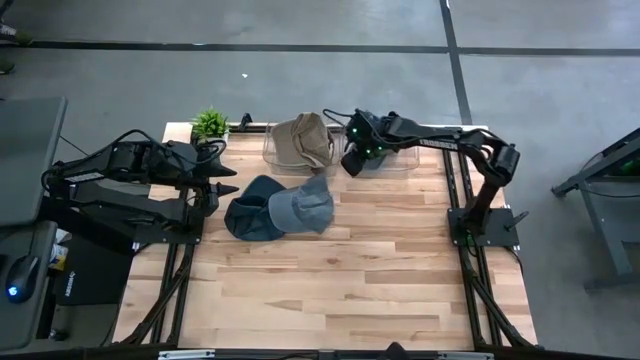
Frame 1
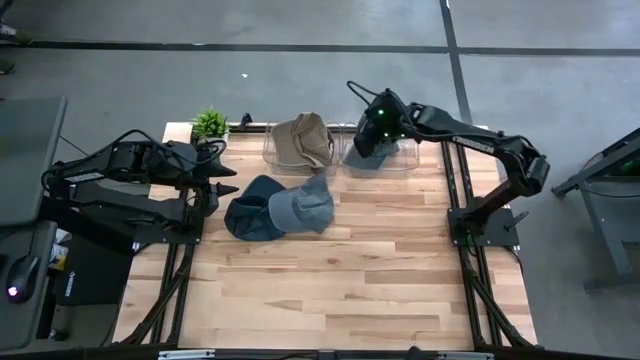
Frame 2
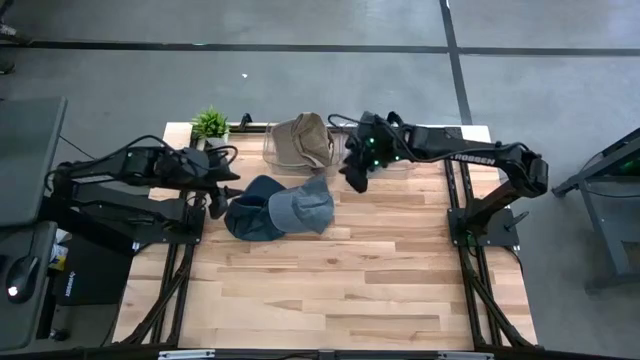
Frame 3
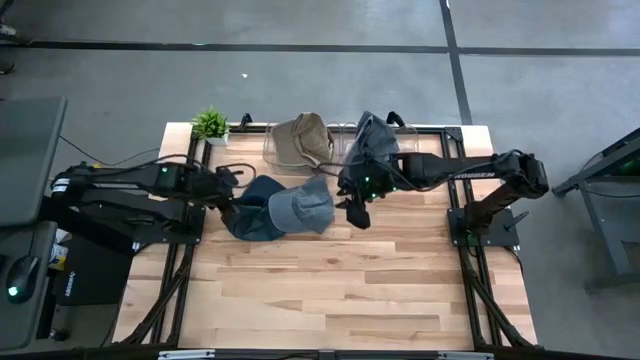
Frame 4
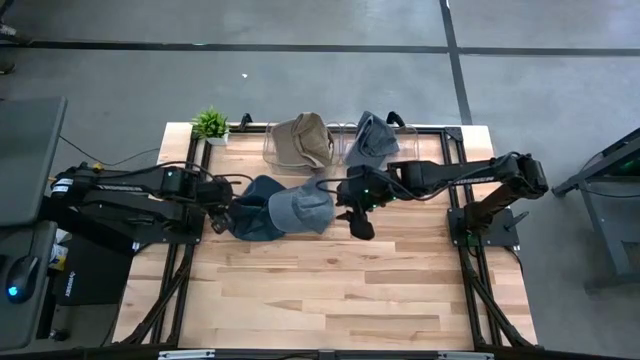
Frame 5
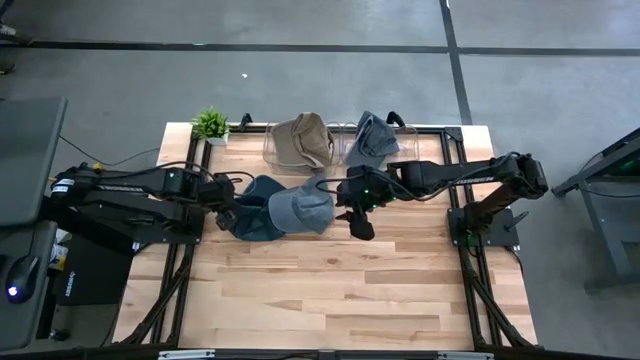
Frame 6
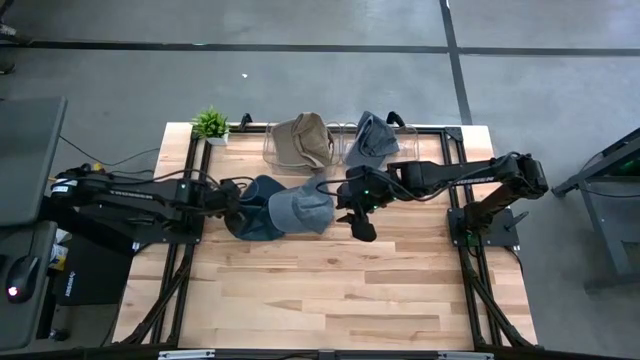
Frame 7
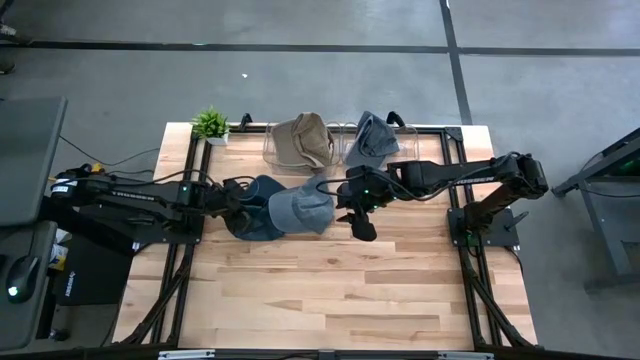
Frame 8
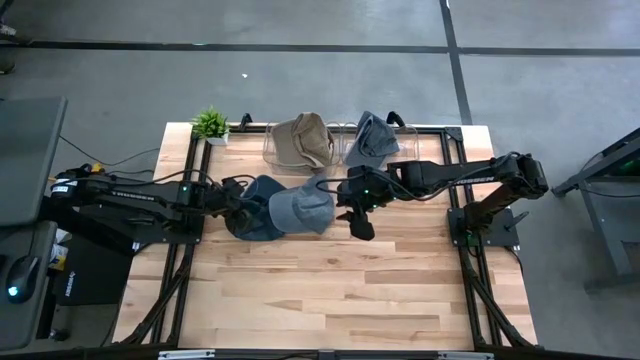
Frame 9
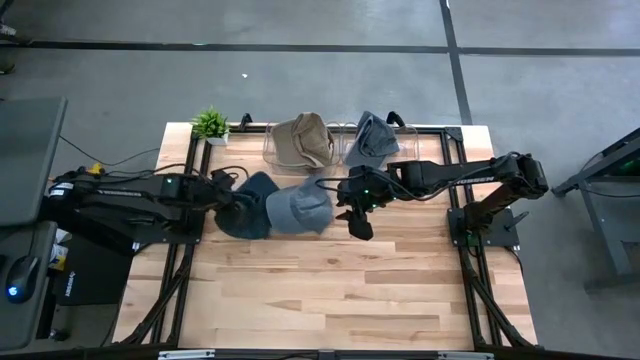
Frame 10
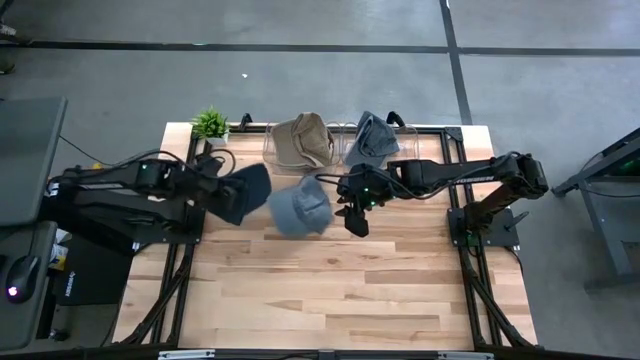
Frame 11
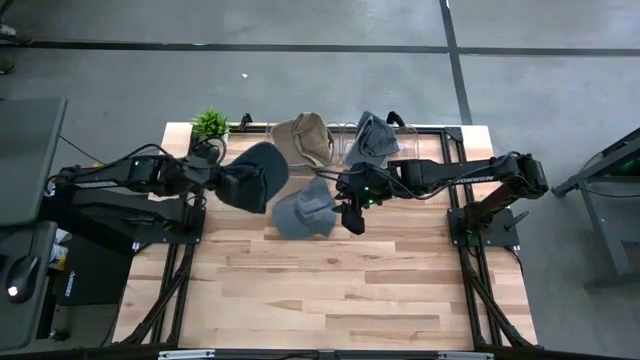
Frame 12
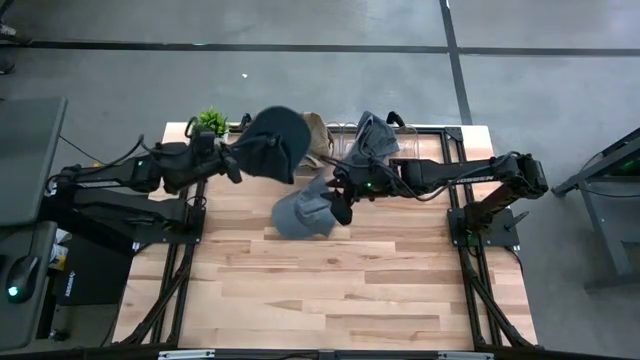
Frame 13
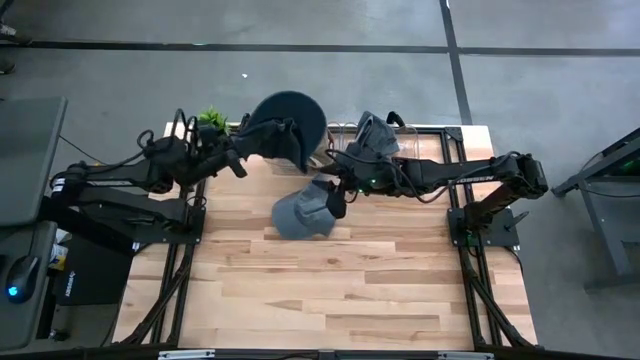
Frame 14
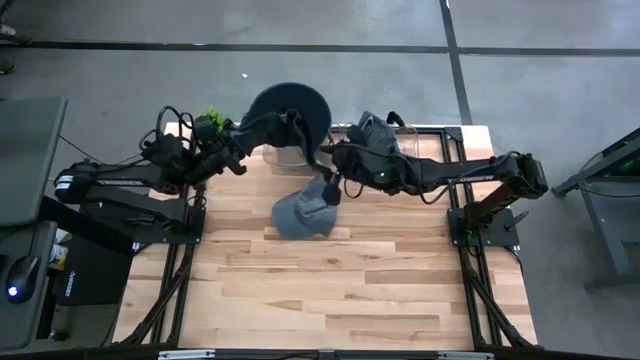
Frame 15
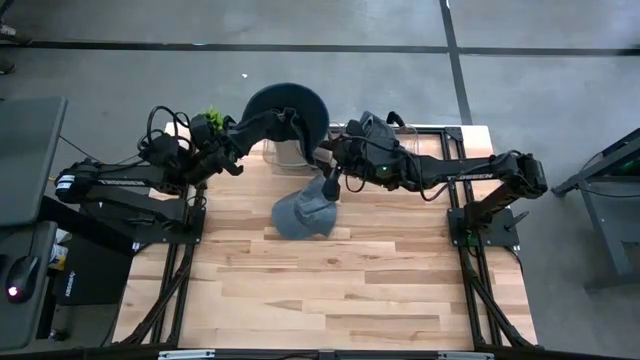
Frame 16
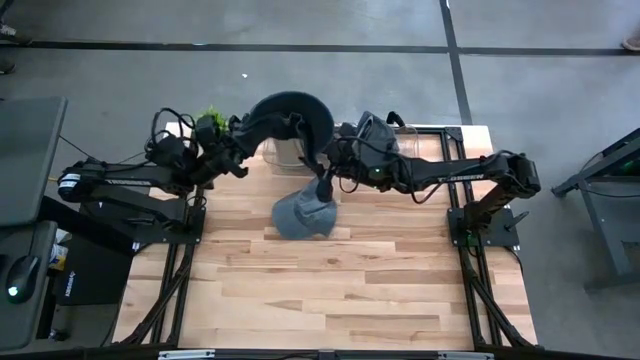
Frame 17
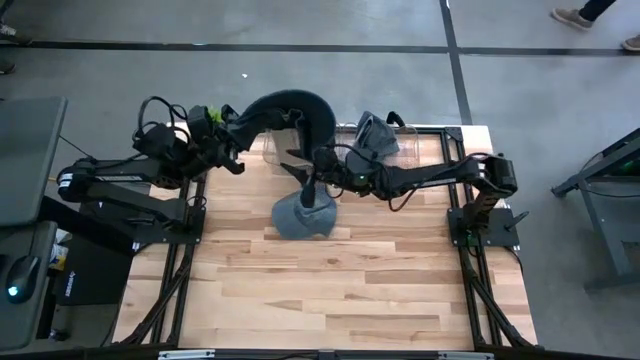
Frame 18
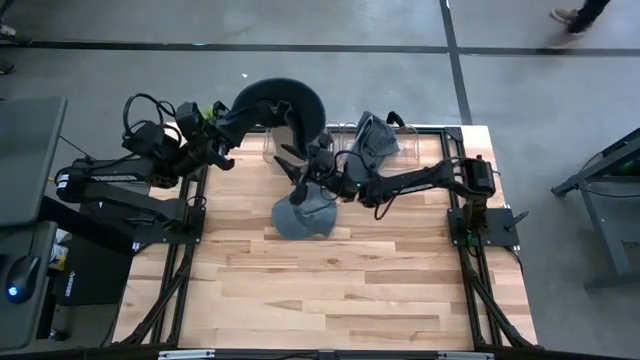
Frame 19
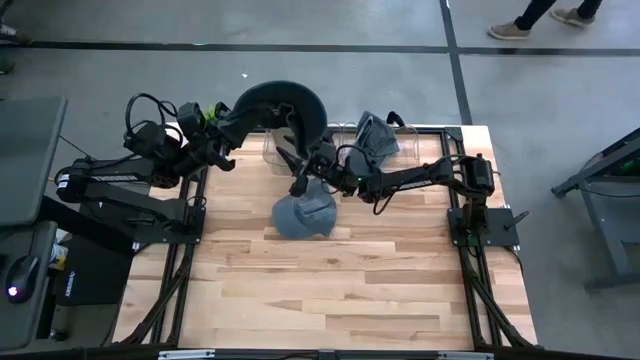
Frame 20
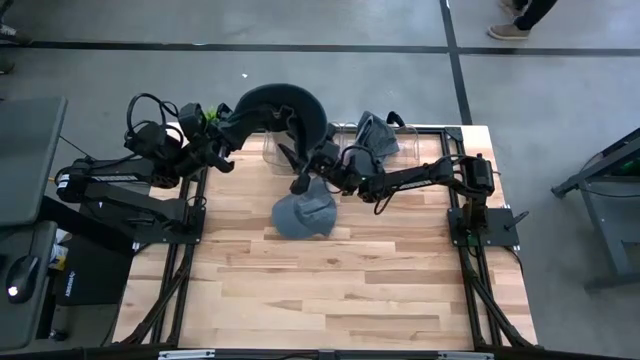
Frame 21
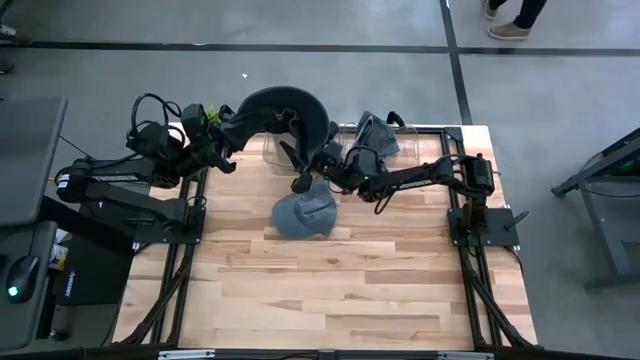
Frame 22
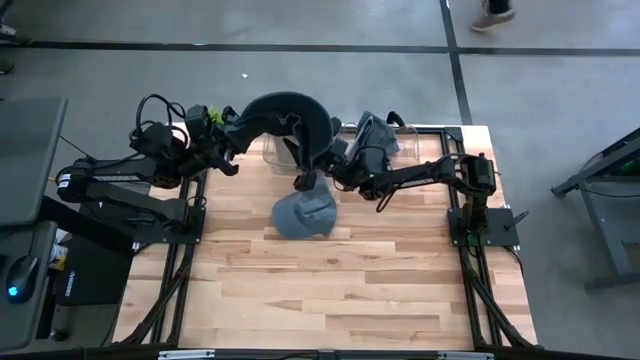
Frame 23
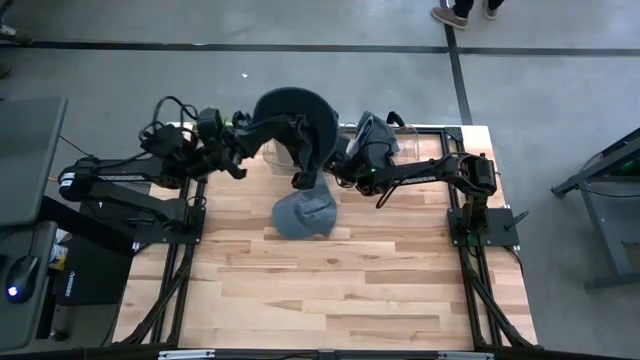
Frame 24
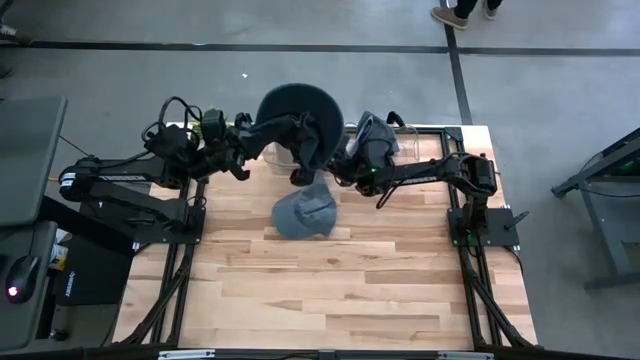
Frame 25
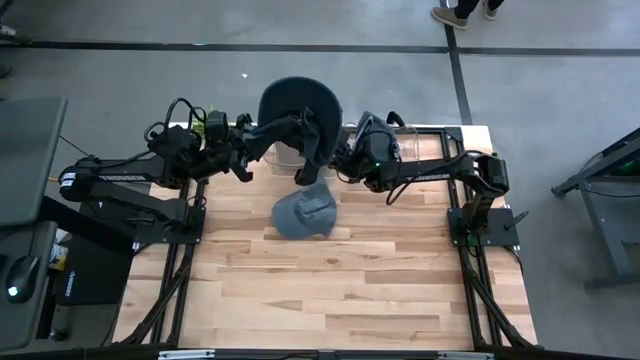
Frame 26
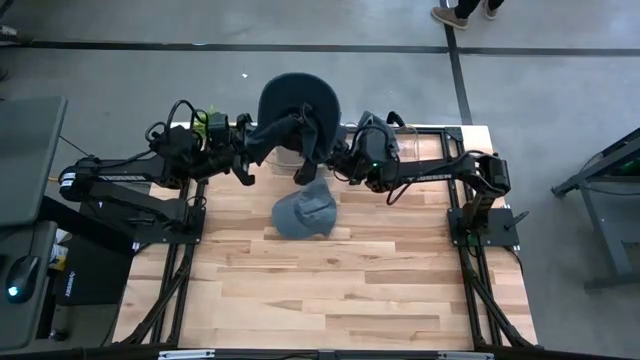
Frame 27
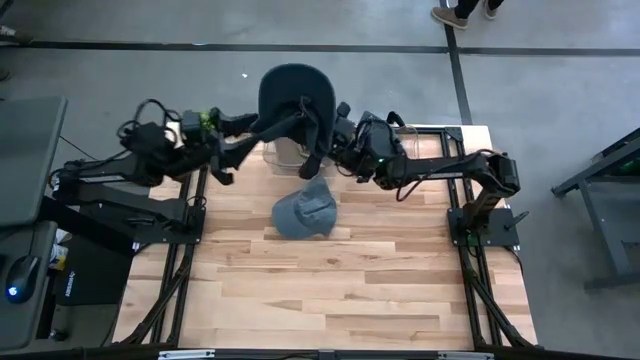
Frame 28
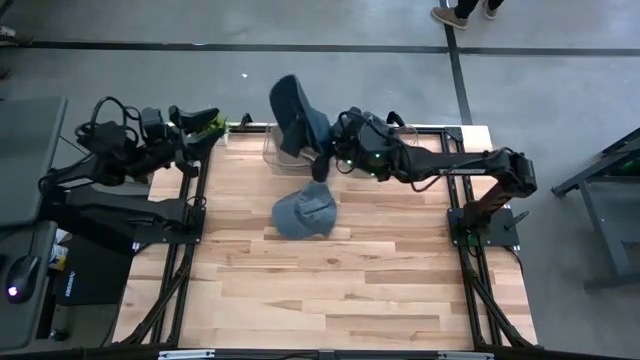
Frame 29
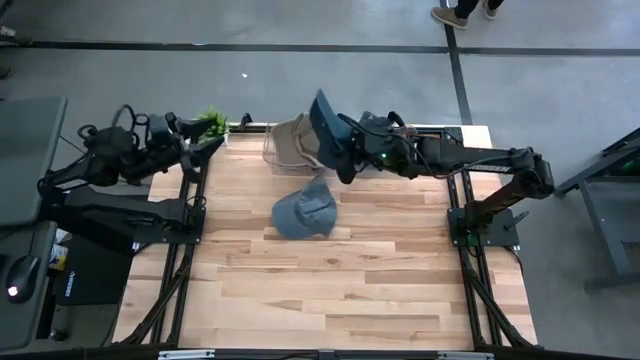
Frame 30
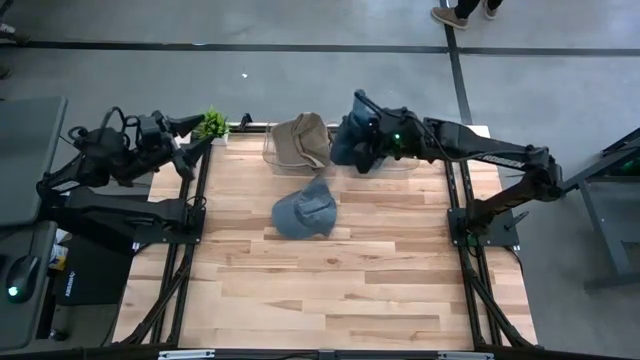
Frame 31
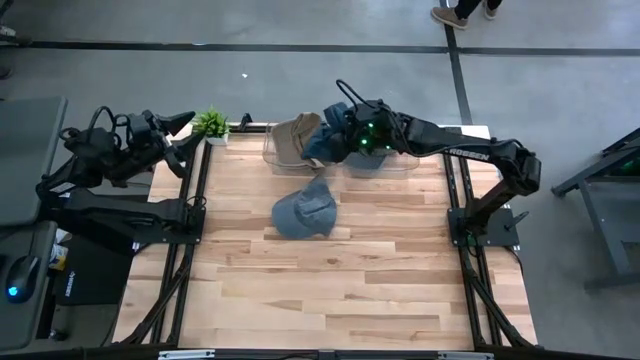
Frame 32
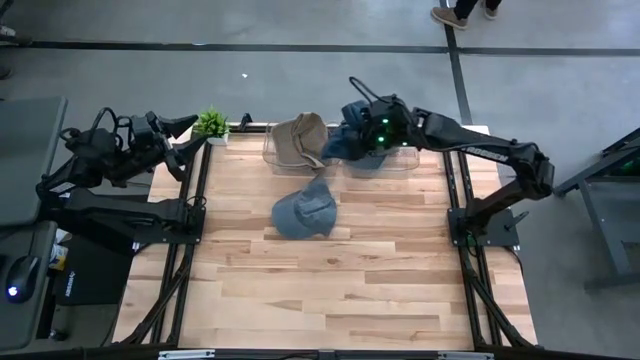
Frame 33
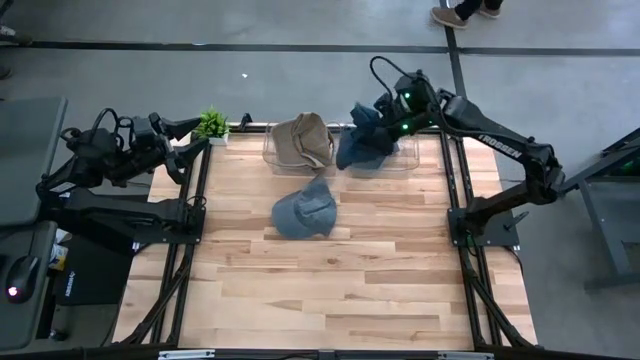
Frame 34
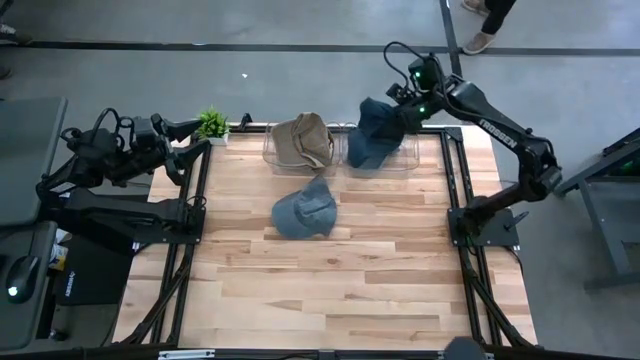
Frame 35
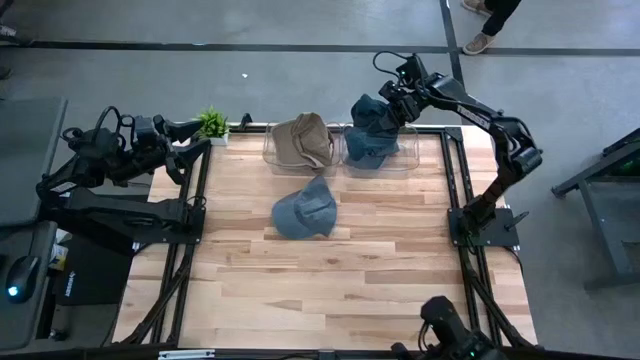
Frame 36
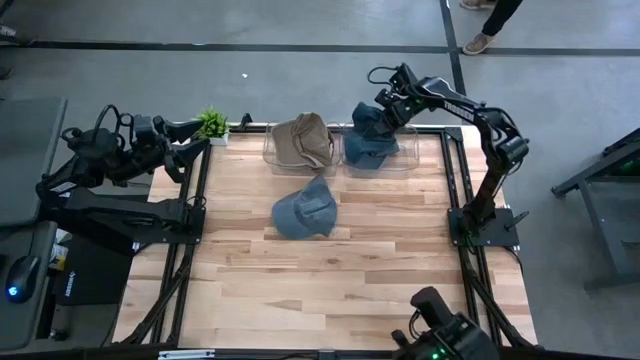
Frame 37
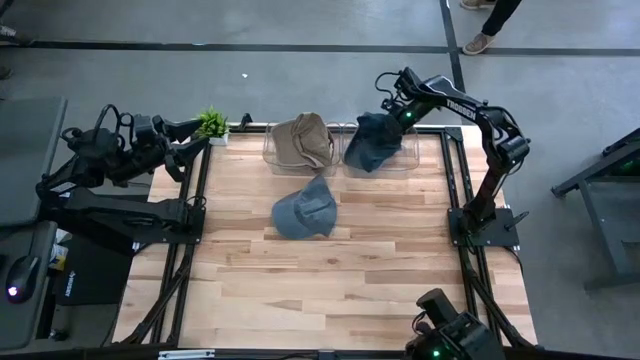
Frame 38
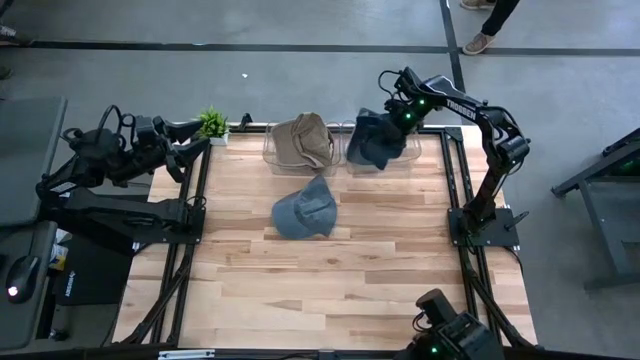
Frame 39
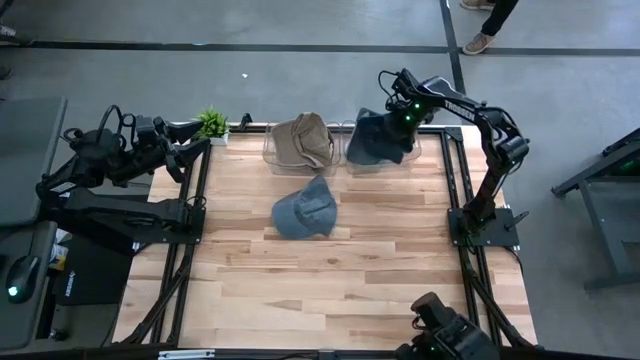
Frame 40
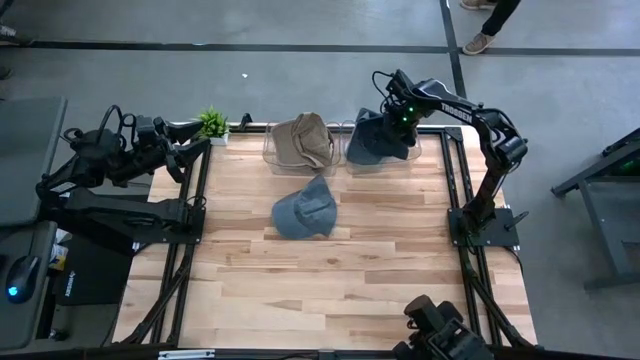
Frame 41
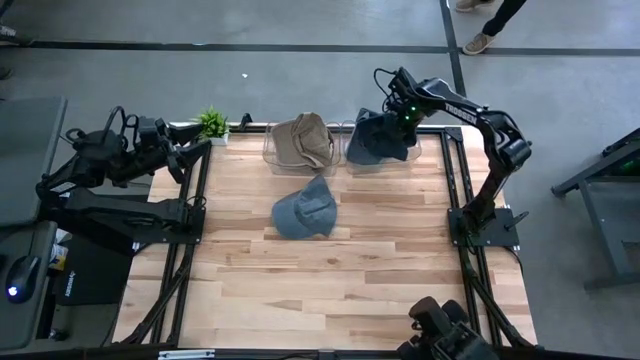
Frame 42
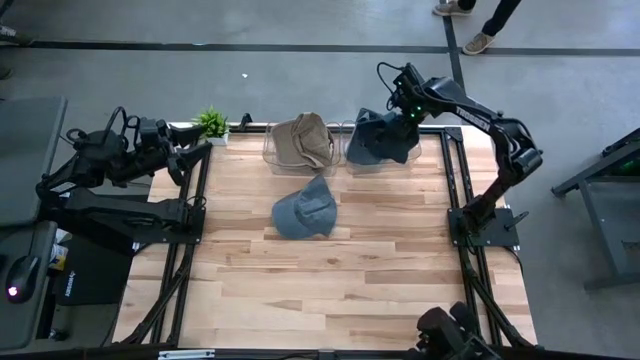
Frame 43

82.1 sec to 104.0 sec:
Task: Pick & Place hat
Put the black cap into the right transparent bin
